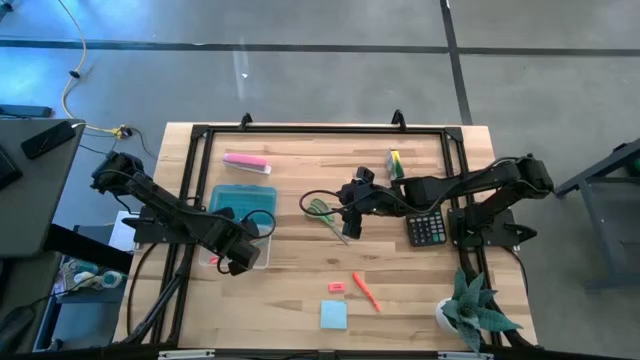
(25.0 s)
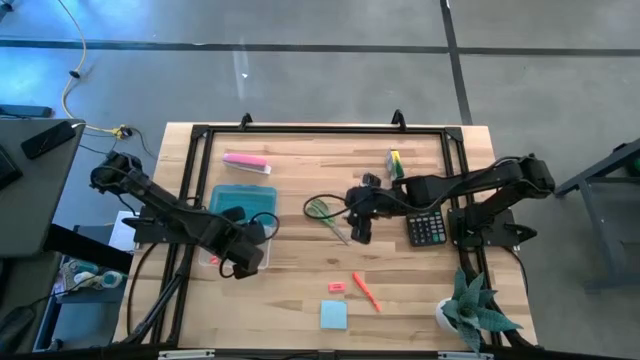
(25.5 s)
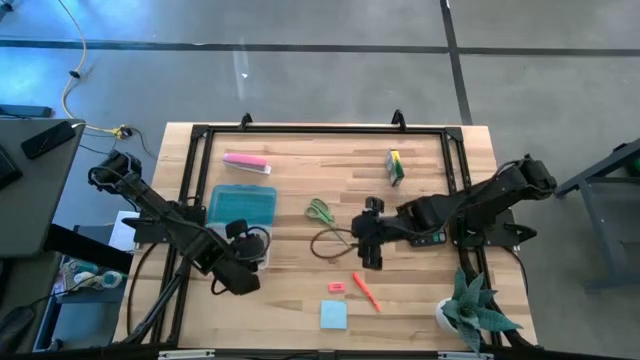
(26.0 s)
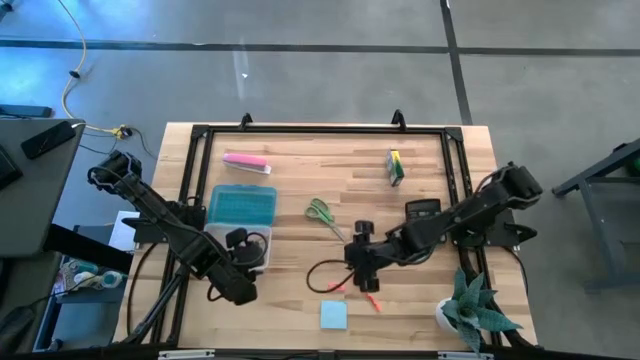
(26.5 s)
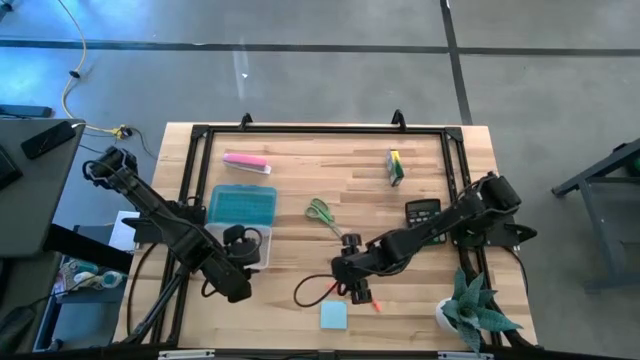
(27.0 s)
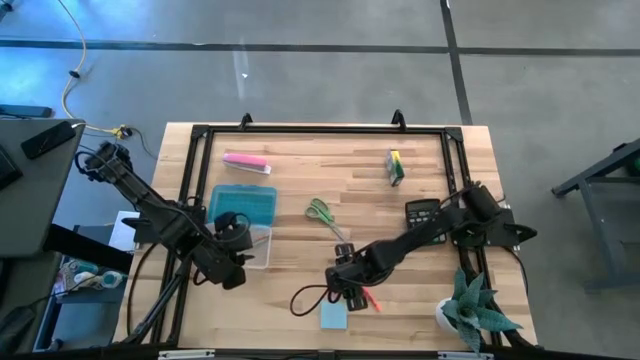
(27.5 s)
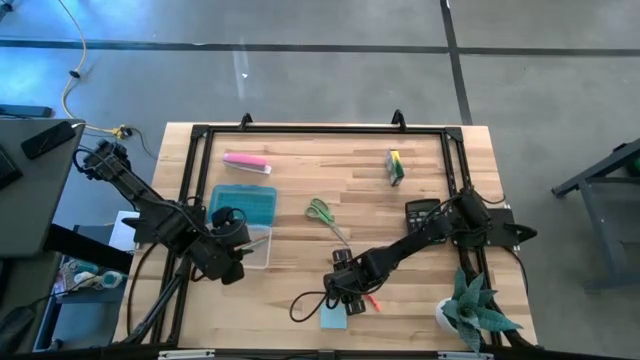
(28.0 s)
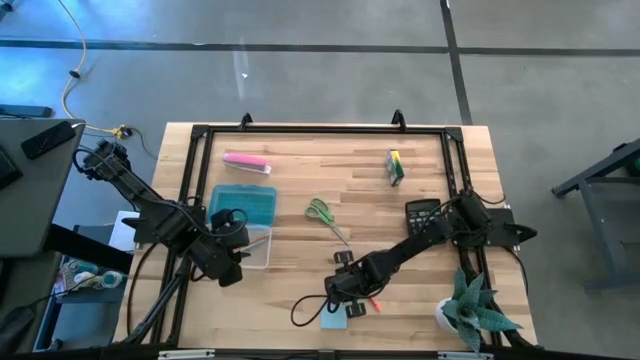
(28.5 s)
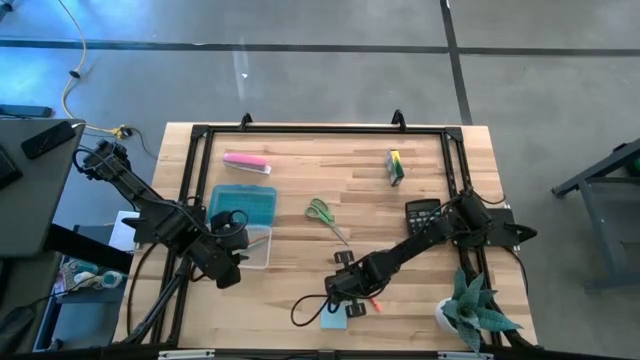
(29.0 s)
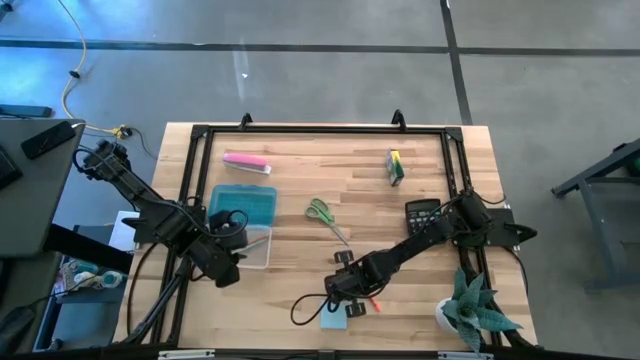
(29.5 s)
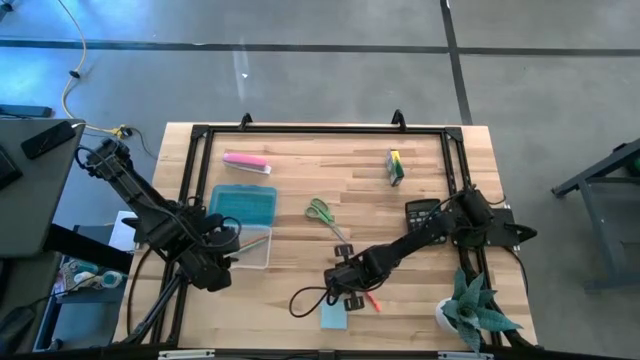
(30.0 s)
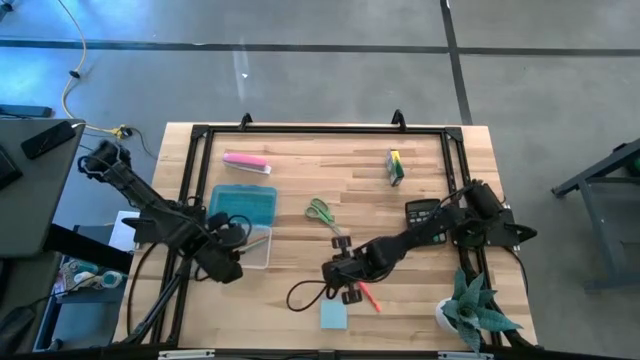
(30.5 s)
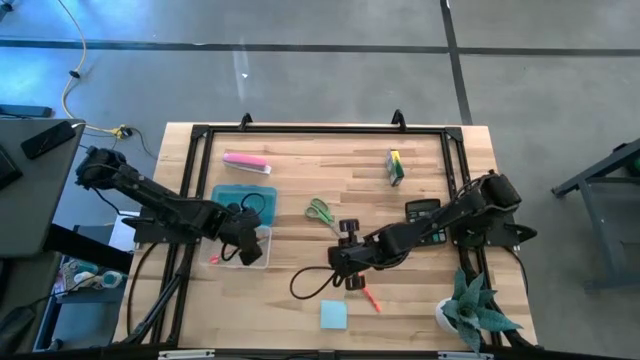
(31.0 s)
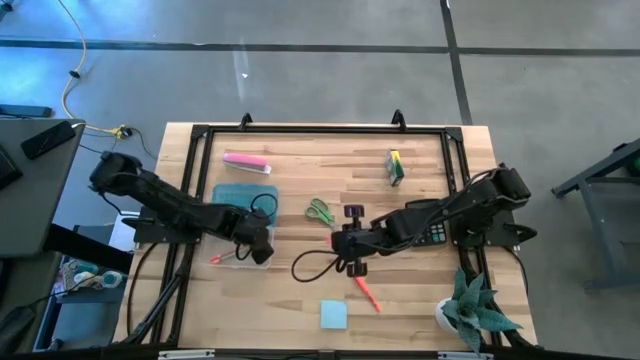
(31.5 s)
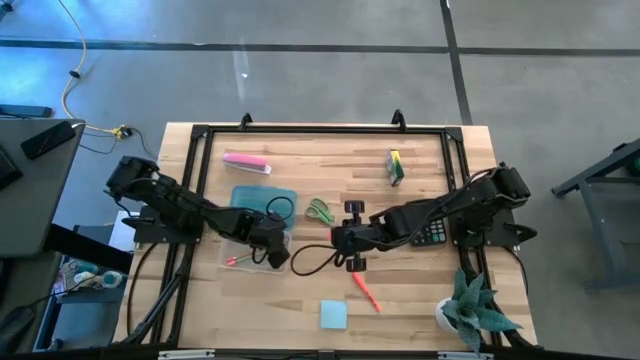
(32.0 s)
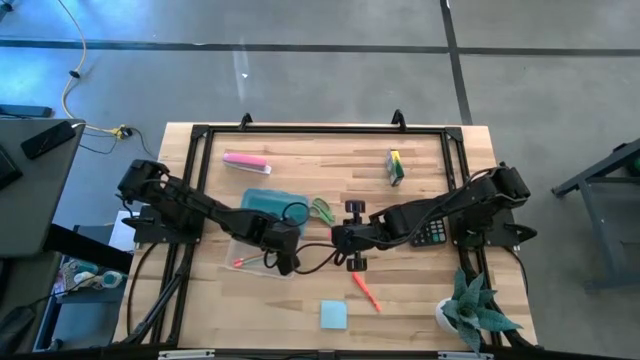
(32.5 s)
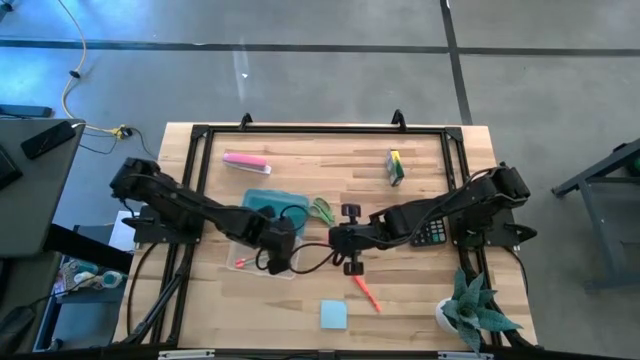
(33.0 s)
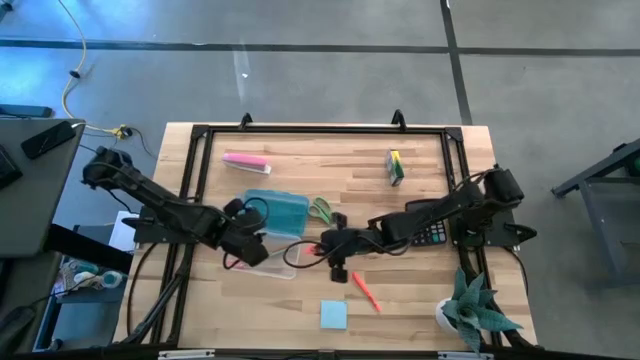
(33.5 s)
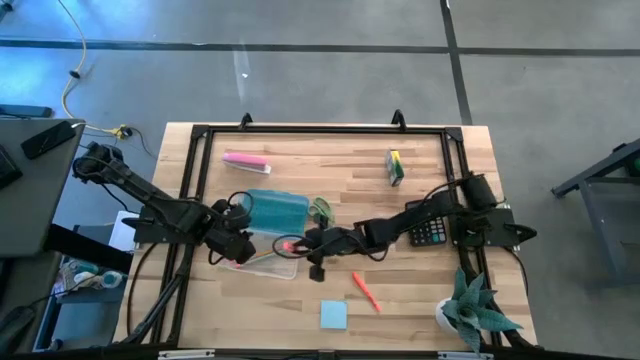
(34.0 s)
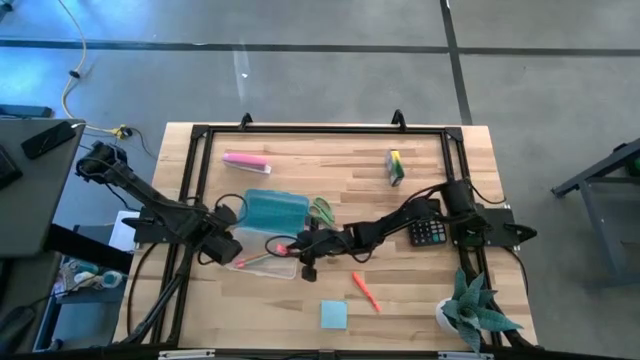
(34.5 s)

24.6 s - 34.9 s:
Task: Pack school essentials
Put the pink eraser into the supply box

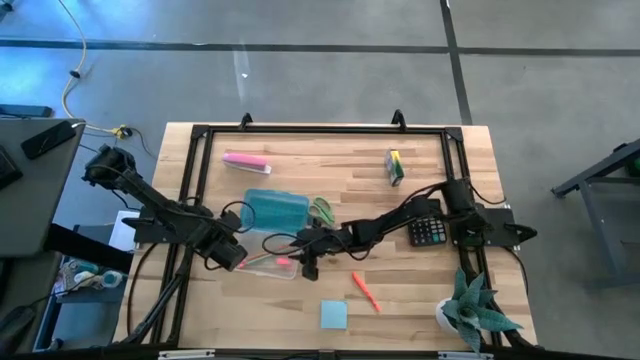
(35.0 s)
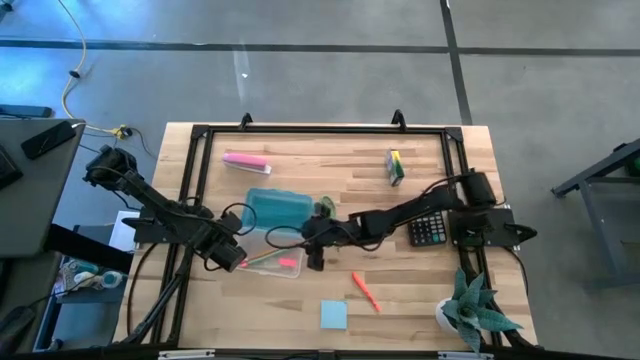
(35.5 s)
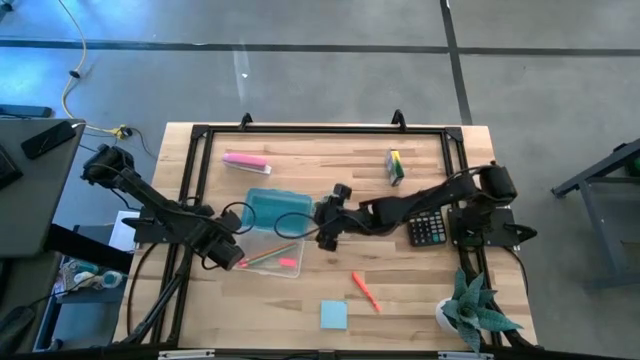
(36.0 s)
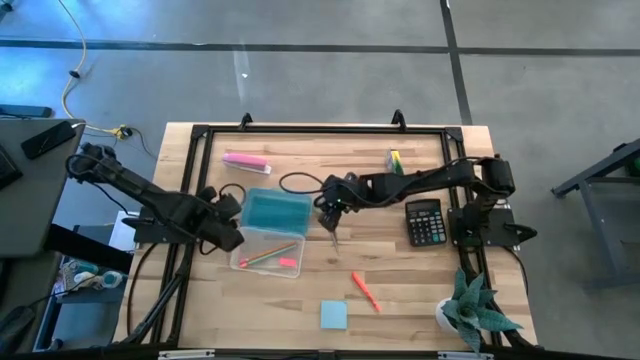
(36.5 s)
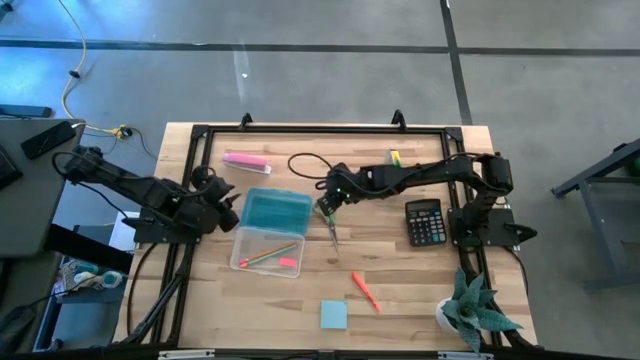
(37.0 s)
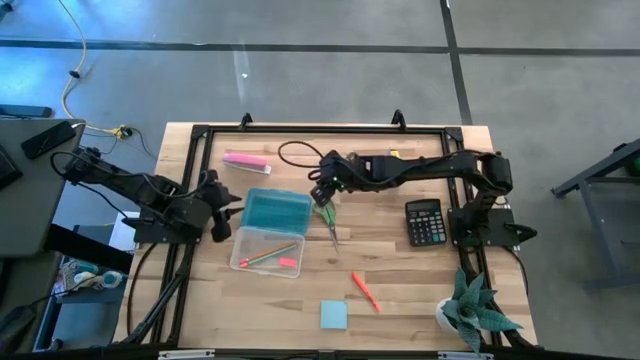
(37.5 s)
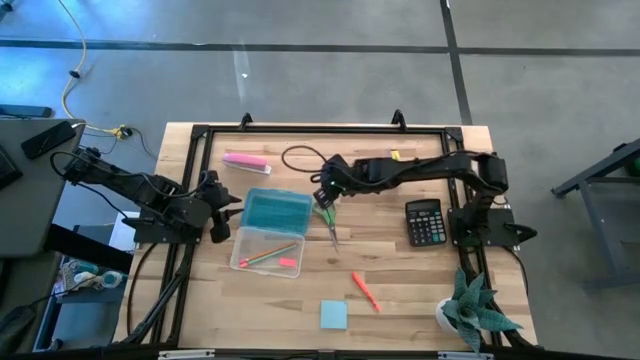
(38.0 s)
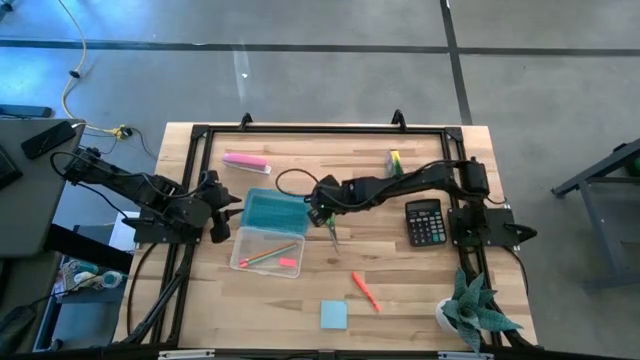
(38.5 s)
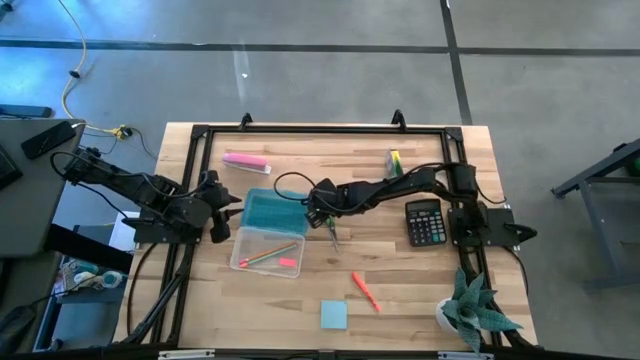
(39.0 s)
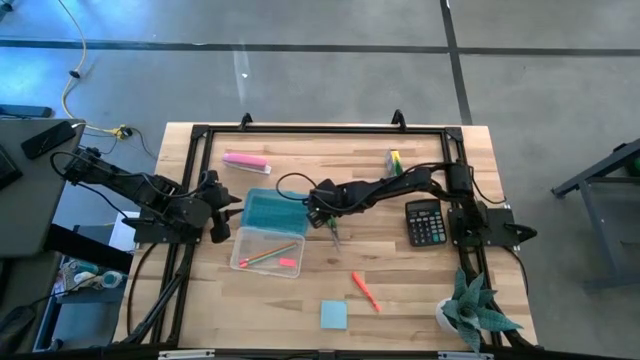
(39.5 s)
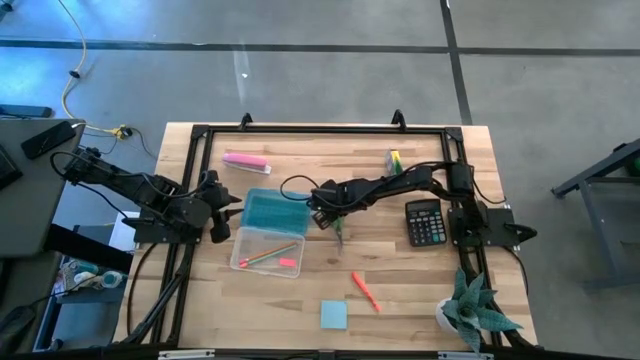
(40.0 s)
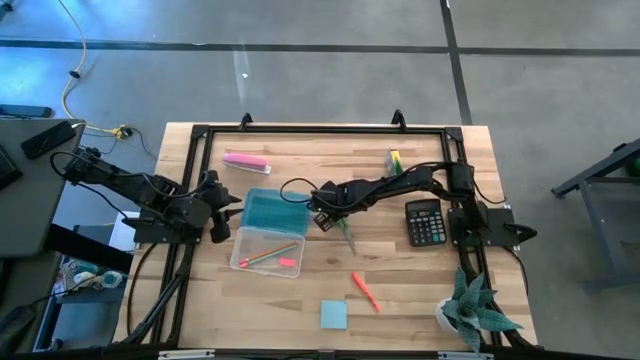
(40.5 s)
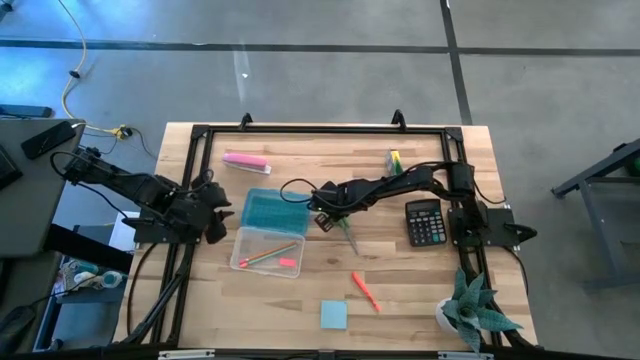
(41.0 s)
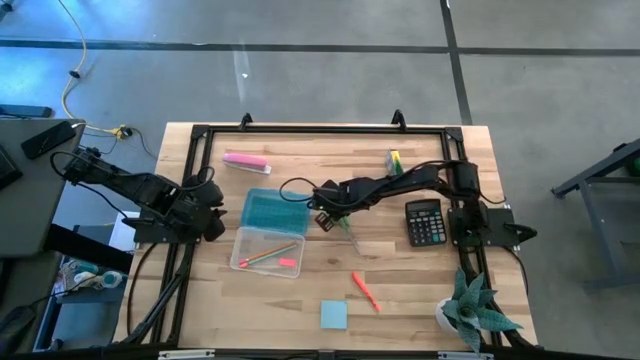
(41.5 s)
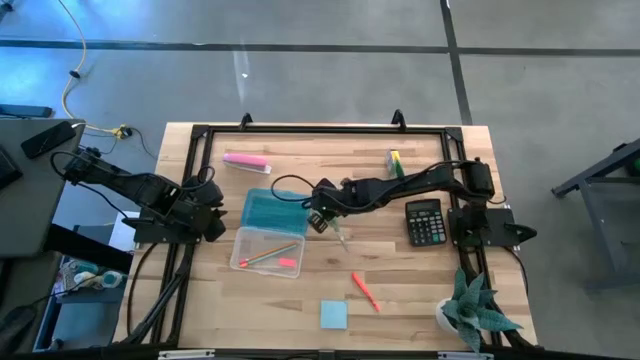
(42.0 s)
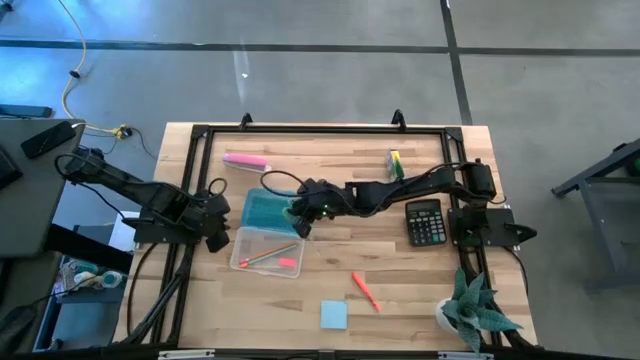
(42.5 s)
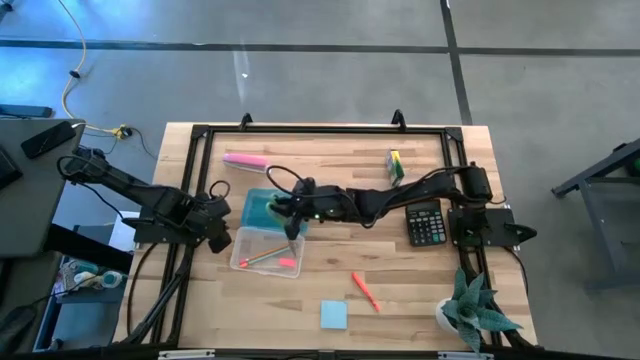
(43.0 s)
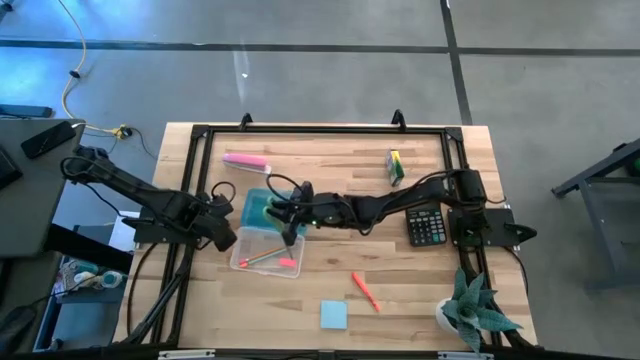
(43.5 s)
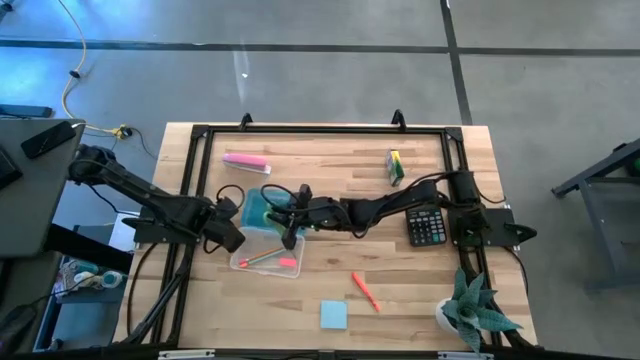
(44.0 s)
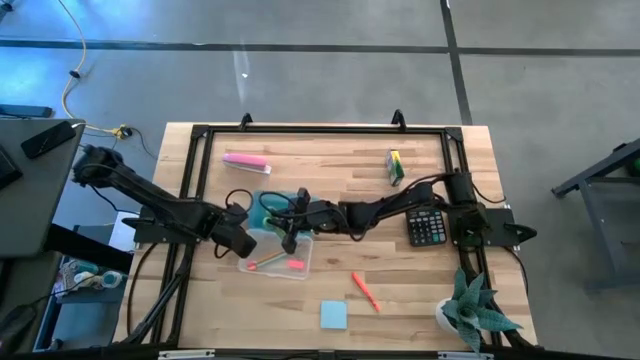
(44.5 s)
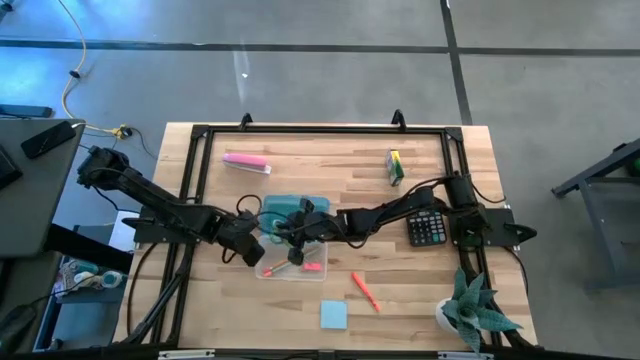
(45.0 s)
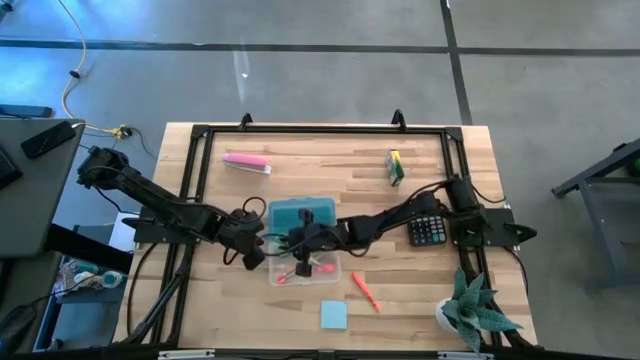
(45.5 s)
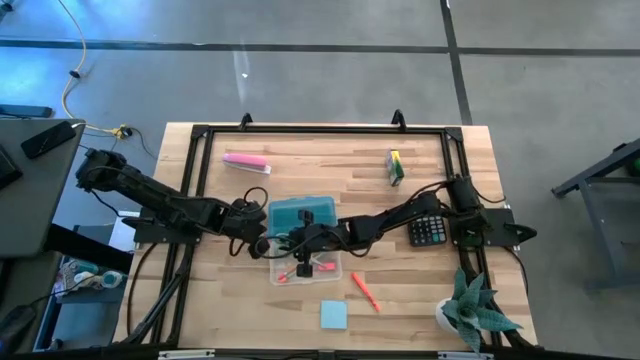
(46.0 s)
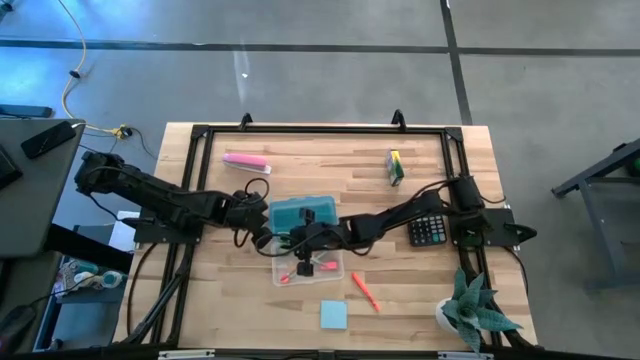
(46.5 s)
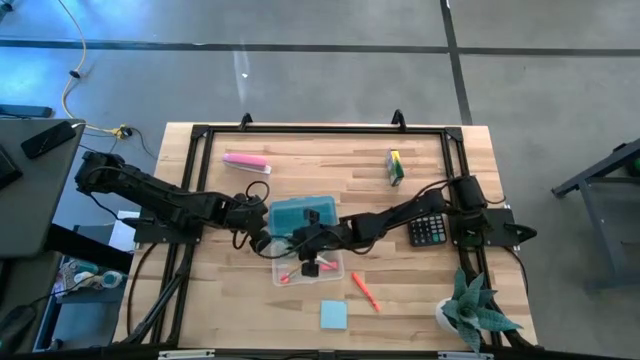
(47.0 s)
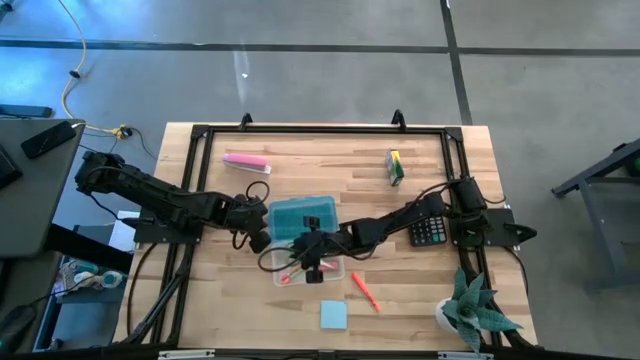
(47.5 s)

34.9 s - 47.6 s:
Put the green scissors into the supply box
